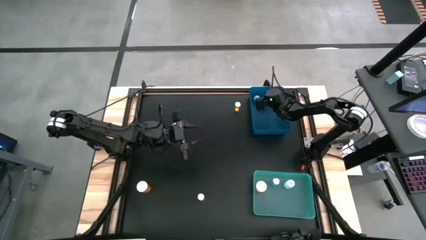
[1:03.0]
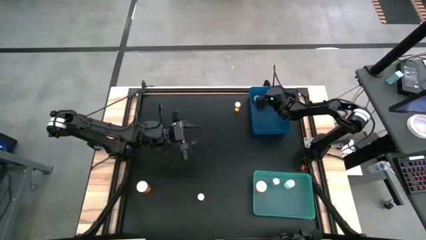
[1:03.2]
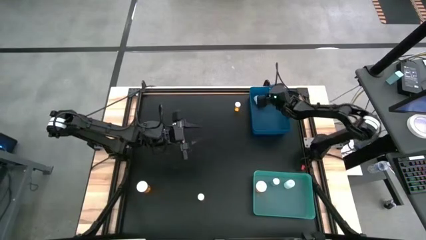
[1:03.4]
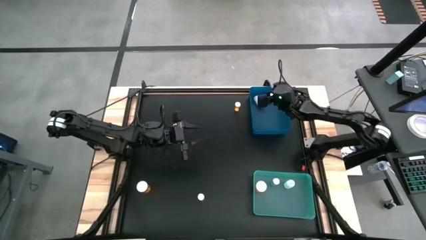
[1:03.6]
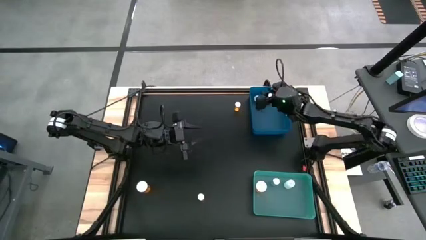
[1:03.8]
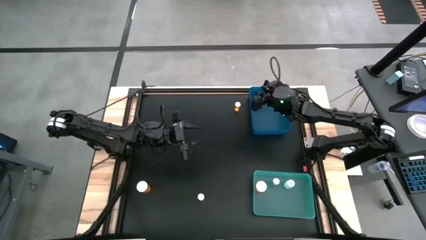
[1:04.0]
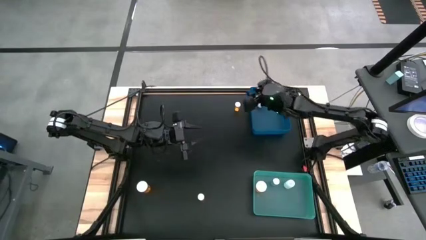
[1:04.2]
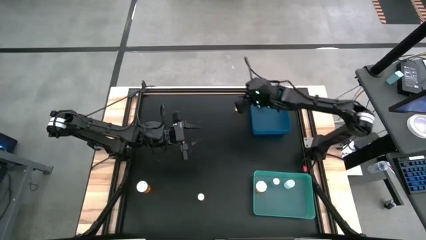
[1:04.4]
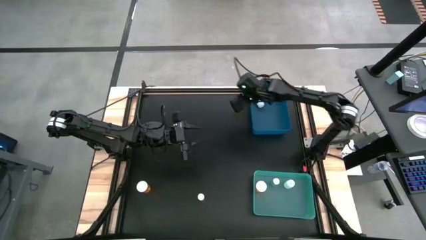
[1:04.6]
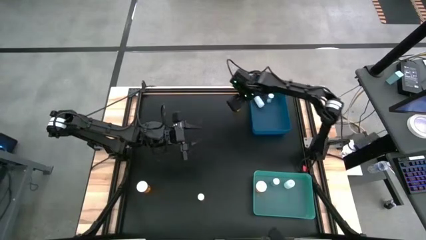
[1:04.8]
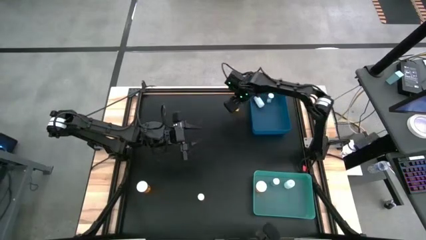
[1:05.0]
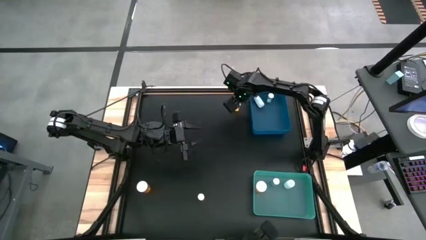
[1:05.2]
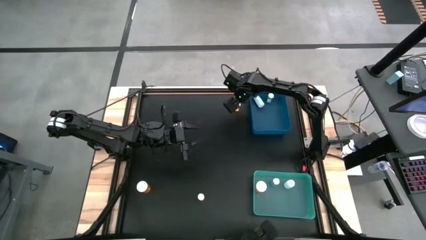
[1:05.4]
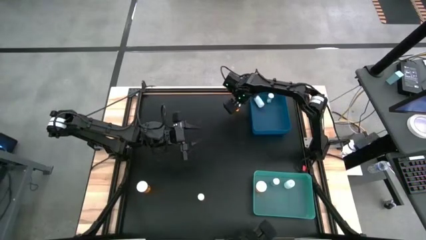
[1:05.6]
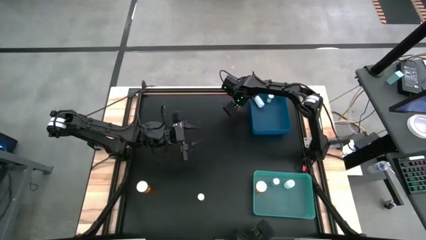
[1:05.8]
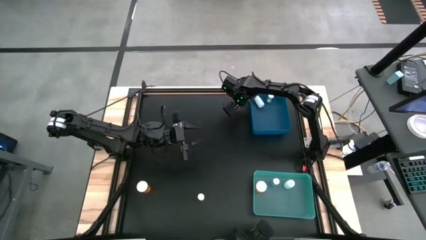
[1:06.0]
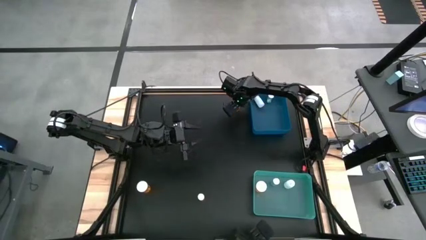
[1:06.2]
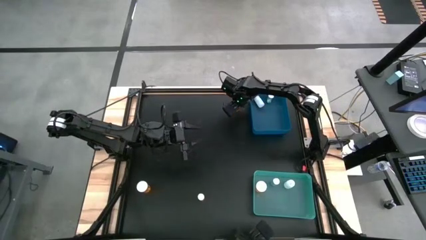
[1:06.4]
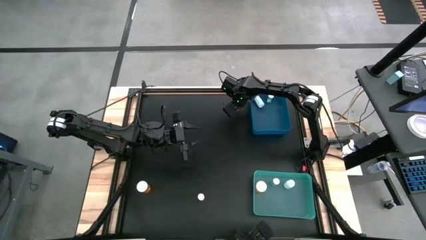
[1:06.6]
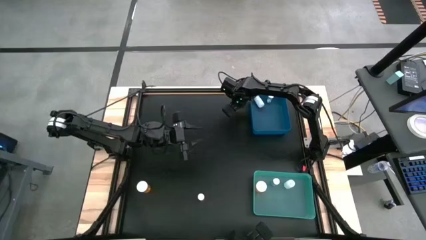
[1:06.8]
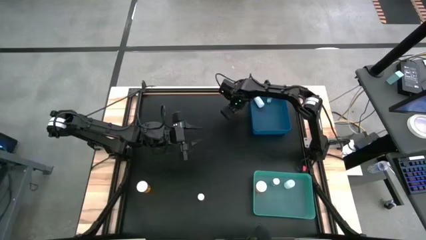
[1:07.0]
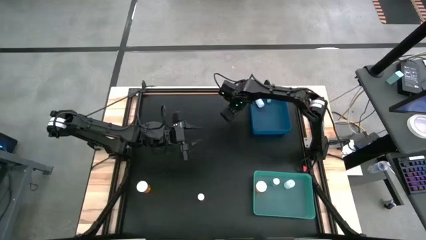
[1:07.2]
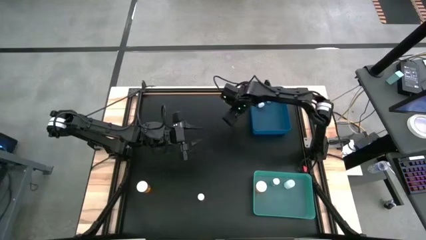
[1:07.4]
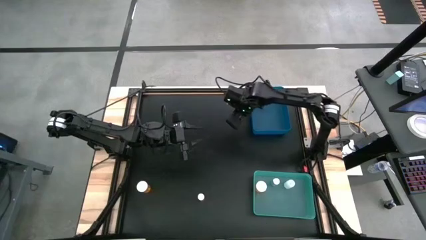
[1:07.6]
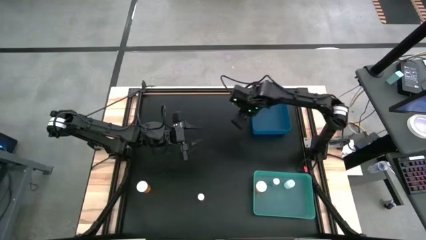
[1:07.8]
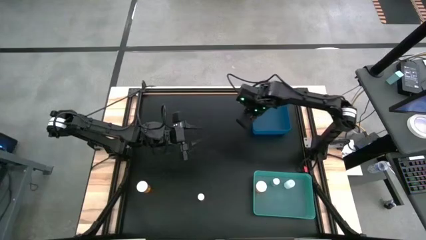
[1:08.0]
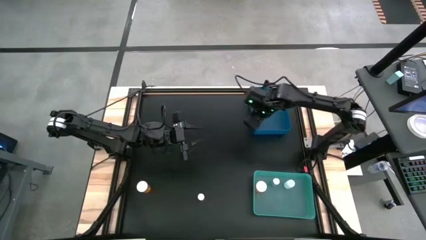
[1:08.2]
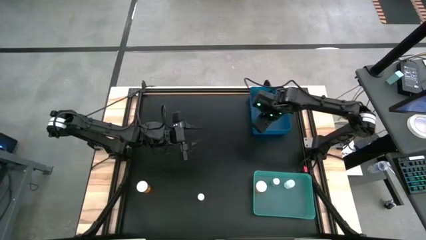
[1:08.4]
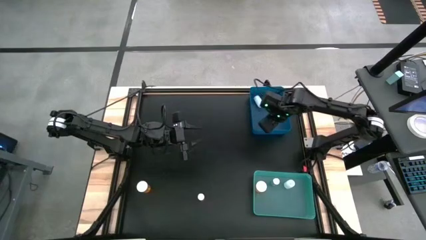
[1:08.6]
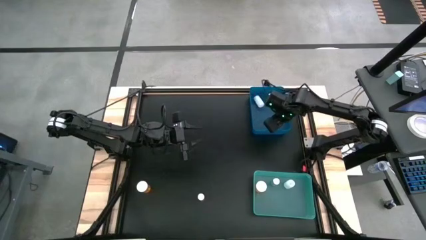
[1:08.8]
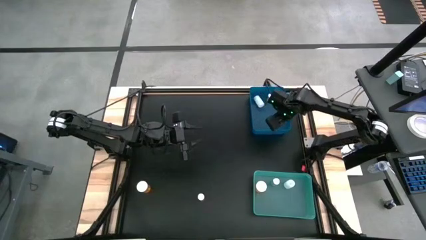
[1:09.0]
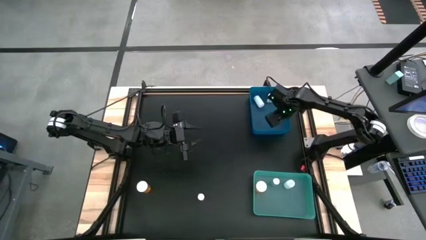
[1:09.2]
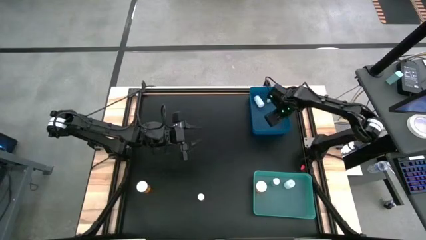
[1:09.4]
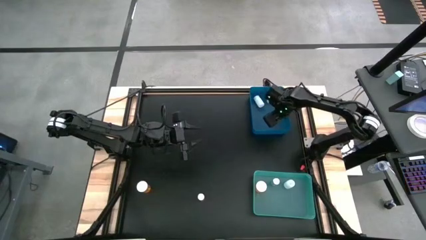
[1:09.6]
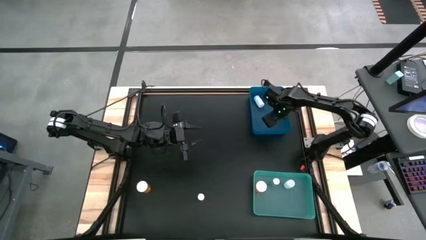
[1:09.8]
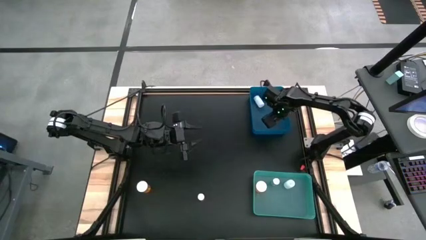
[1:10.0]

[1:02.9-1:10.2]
Task: Pick and place medicine bottles into bin by pill shape (circle, oval)
Put the orange pill bottle into the blue bin

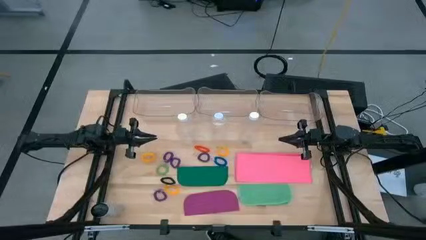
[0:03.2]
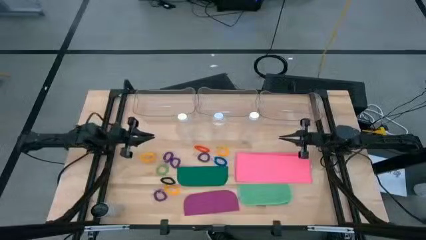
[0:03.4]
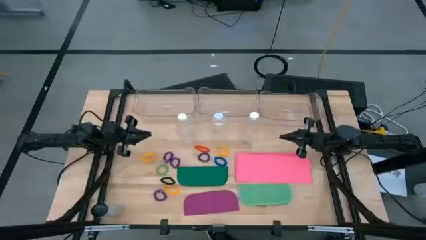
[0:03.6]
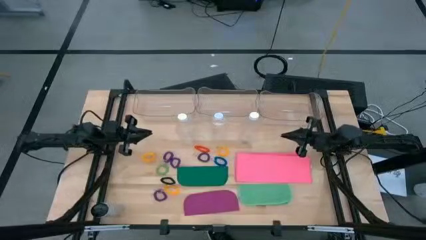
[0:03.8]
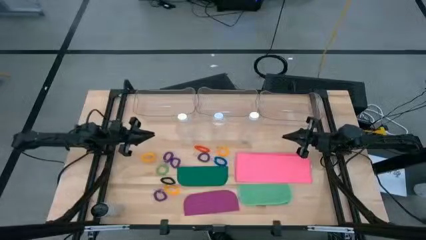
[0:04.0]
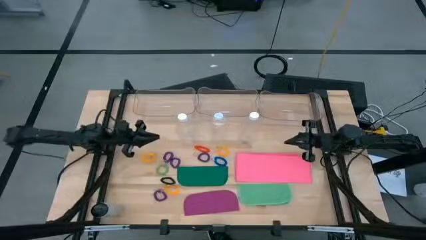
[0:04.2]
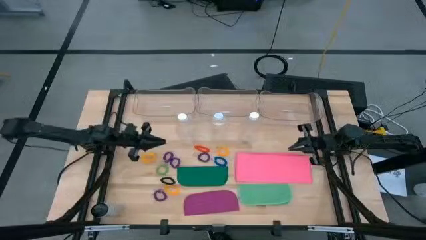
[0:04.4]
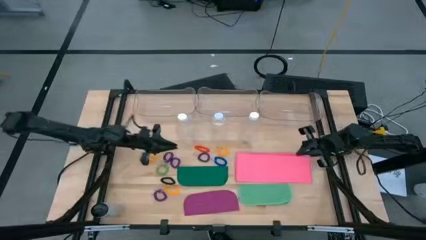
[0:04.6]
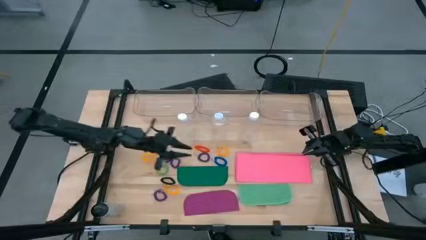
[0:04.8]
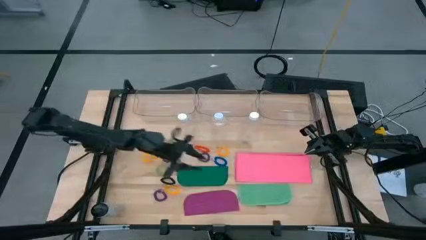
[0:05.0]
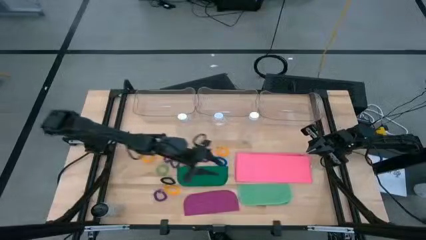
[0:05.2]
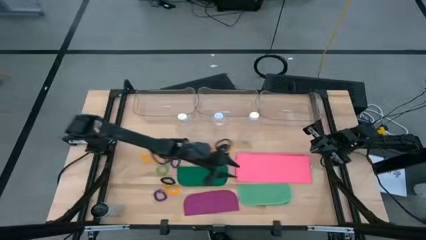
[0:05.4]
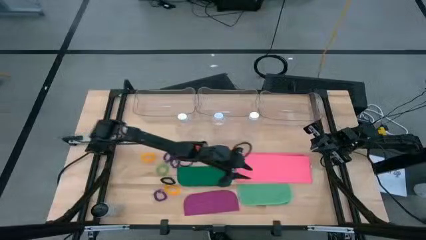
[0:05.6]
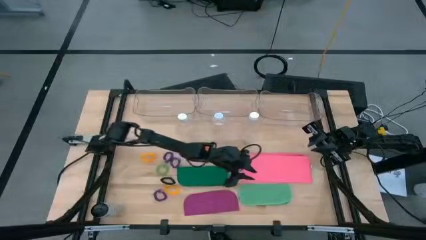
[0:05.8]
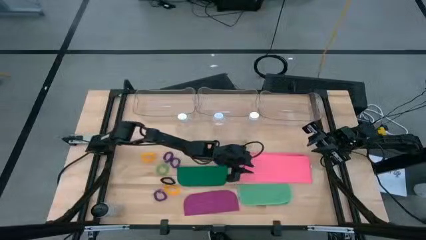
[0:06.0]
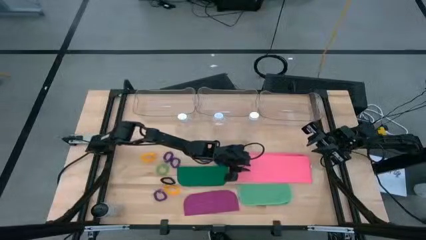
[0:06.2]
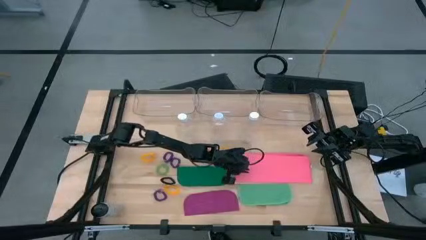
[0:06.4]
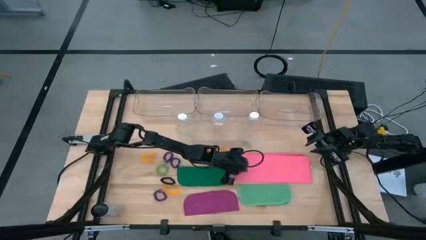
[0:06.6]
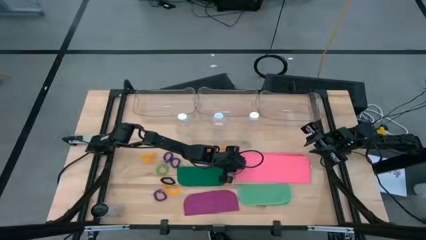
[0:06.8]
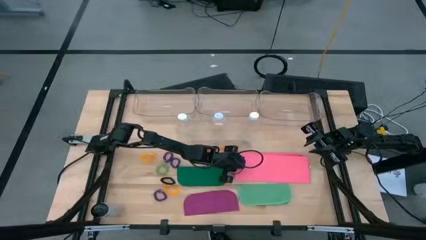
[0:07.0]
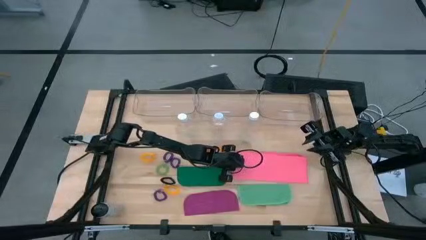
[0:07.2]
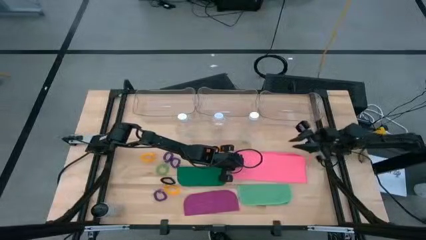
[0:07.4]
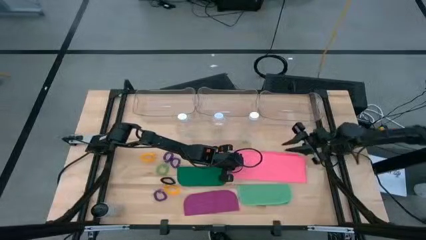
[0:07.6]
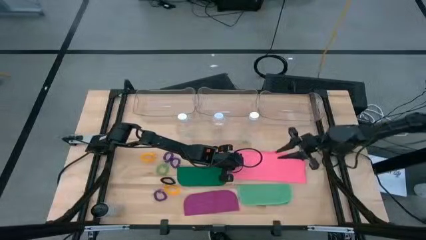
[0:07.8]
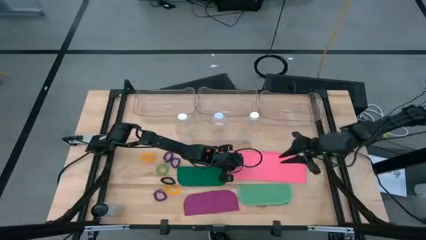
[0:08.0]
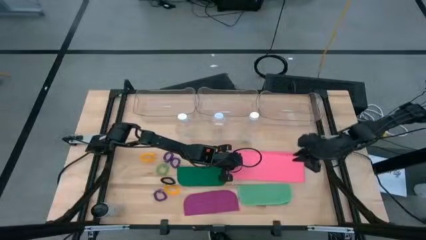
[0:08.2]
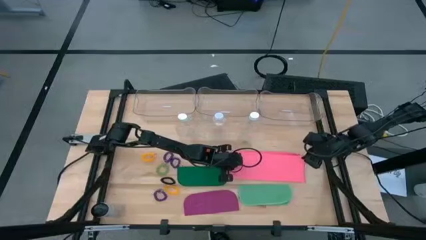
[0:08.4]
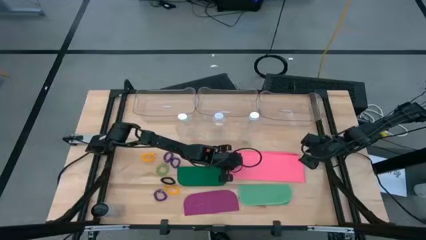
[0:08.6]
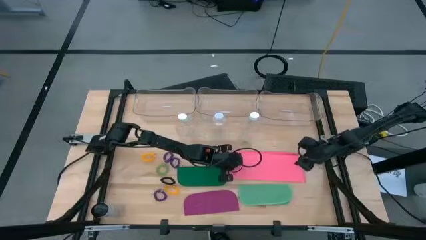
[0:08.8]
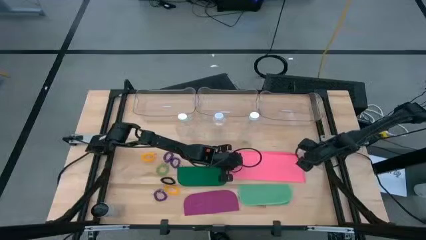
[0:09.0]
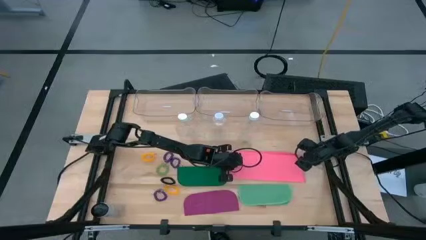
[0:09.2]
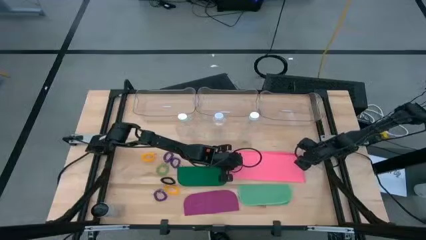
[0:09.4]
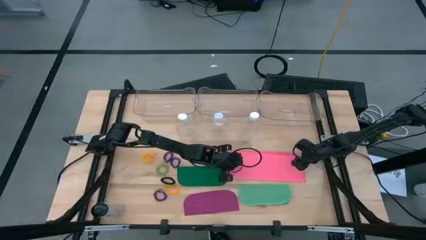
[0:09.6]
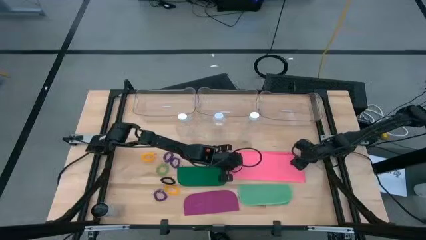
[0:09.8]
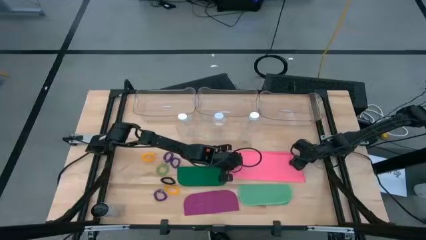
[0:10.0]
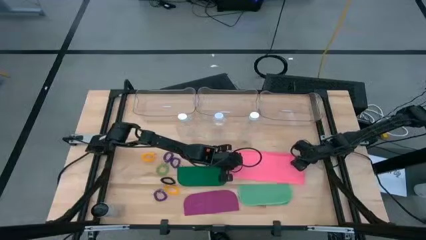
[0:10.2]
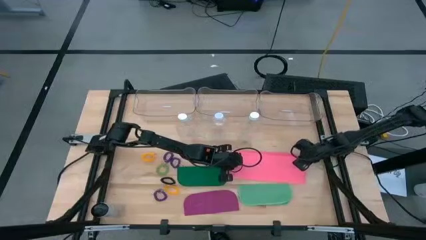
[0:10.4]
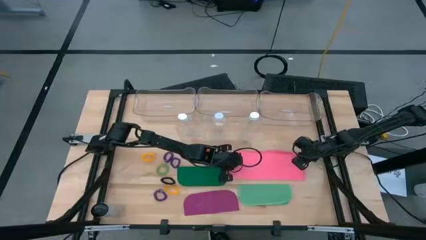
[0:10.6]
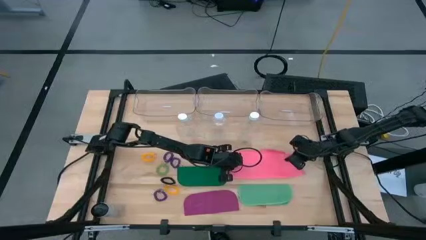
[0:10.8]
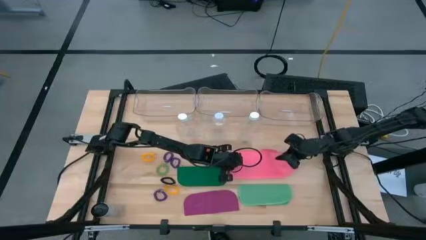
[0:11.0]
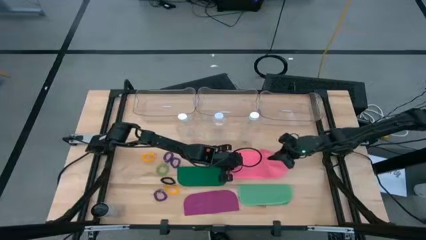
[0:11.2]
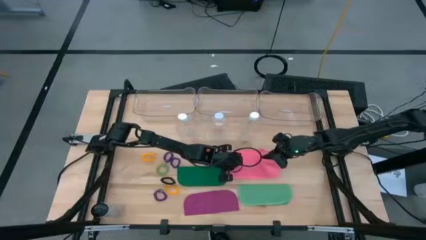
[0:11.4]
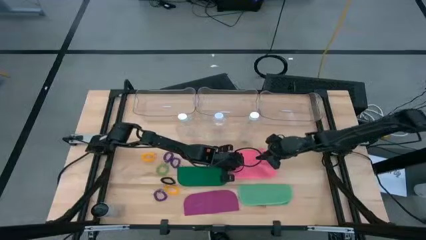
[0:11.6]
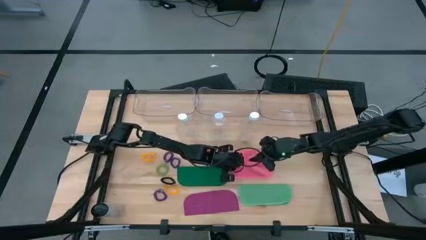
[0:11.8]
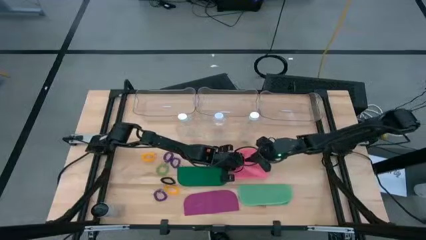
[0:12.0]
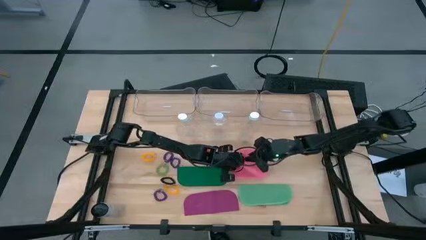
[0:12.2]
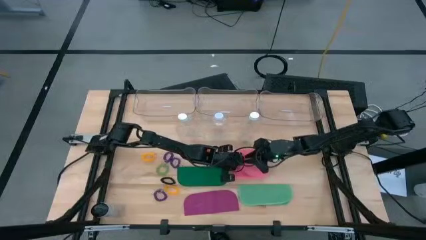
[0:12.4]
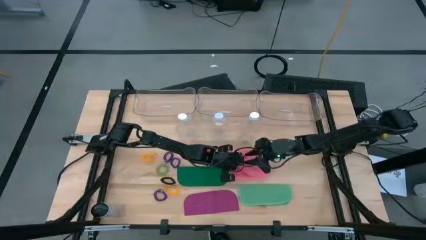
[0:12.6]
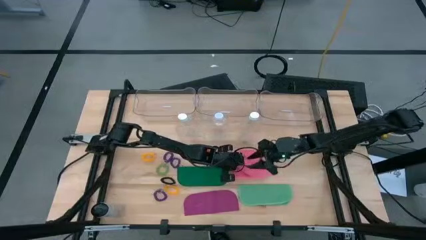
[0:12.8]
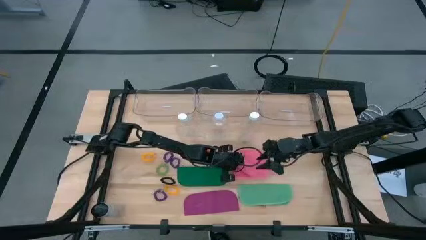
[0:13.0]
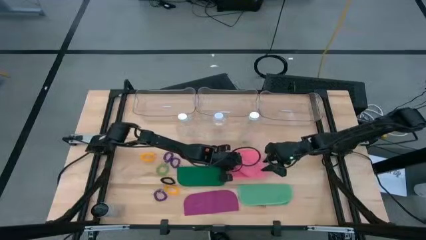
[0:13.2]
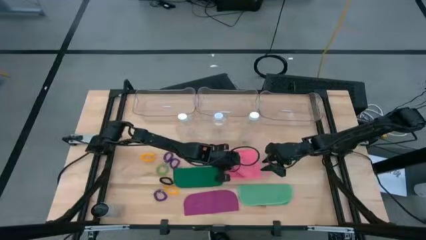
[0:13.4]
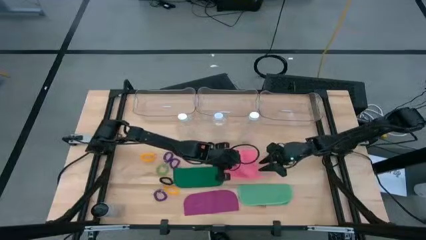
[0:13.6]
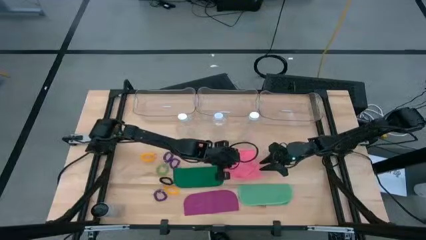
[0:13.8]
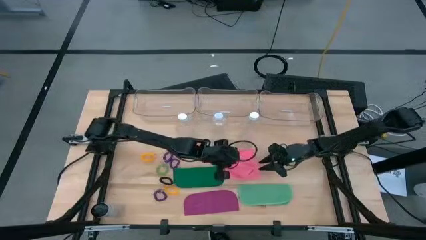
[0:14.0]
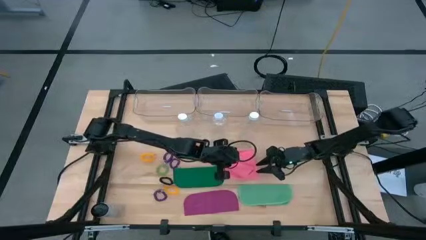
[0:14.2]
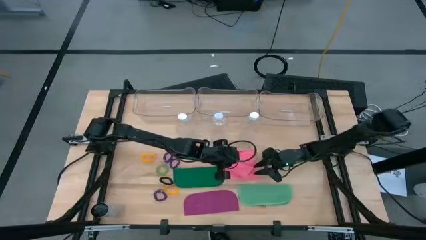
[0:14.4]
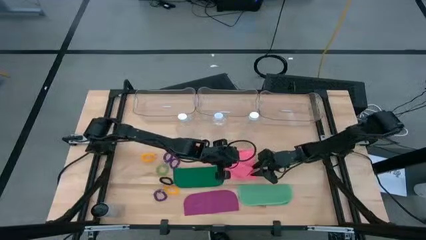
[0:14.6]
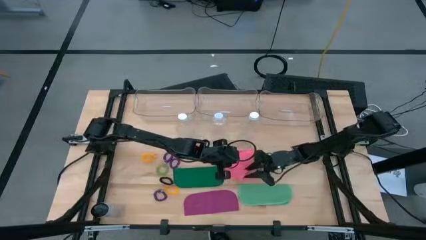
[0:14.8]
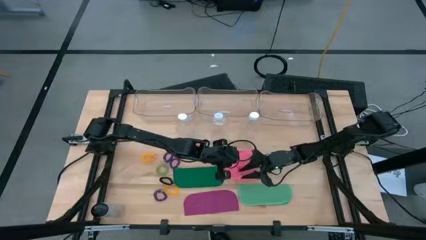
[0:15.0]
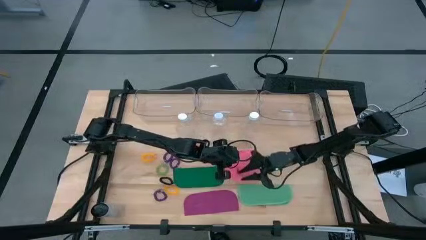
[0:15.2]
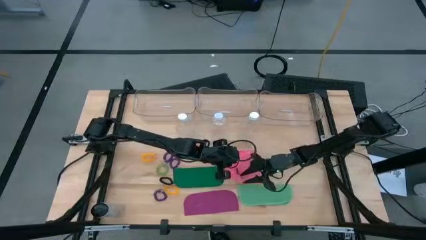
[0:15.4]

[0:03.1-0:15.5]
Task: Pick & Place Sports Items
Fold the pink microfiber towel
